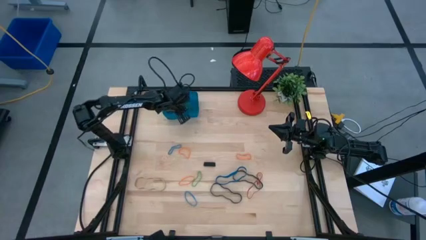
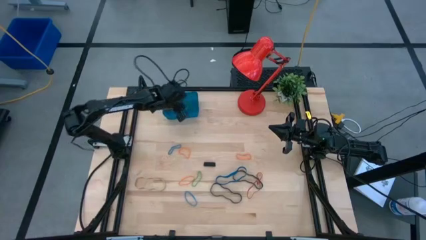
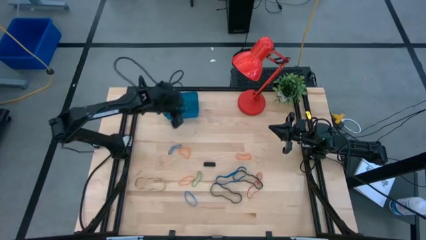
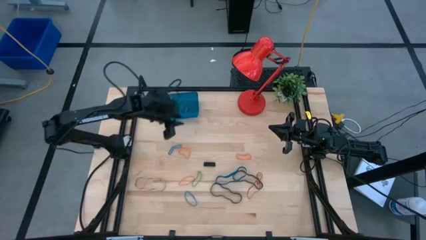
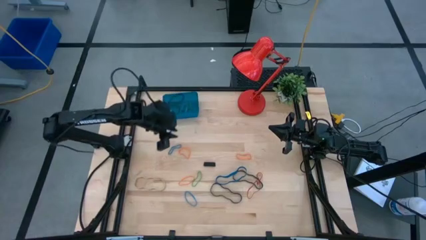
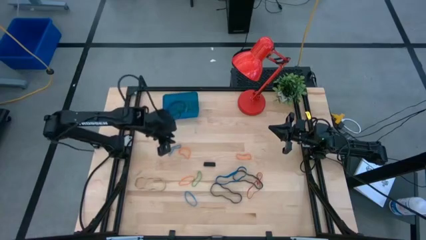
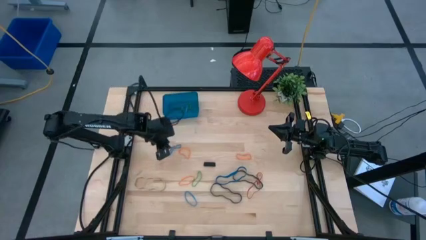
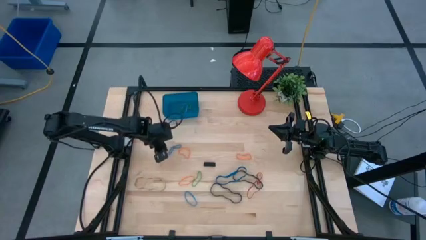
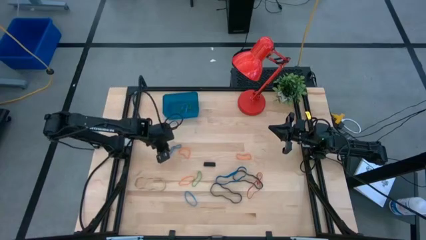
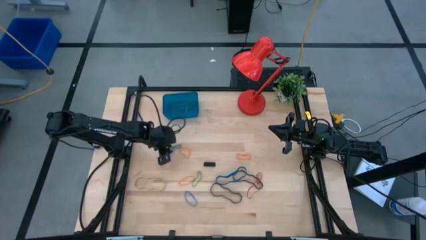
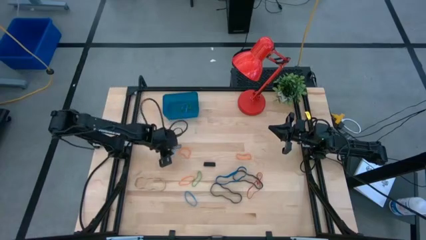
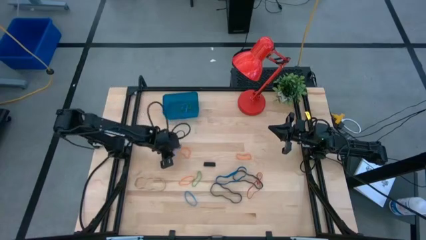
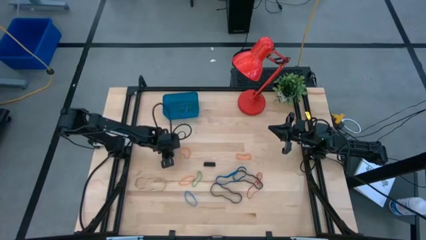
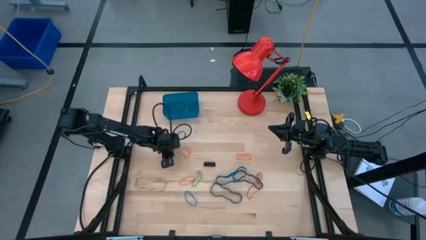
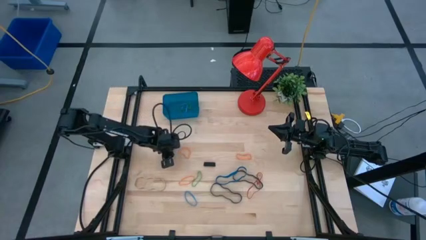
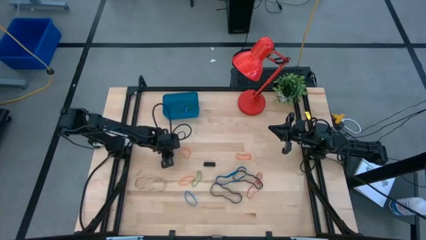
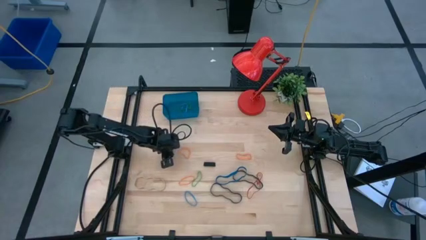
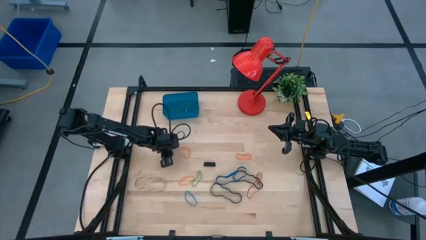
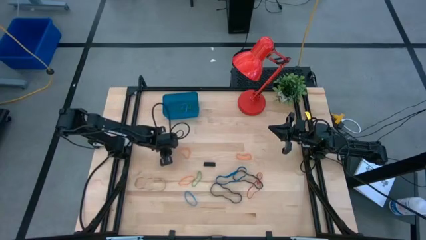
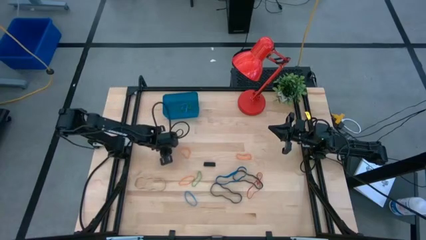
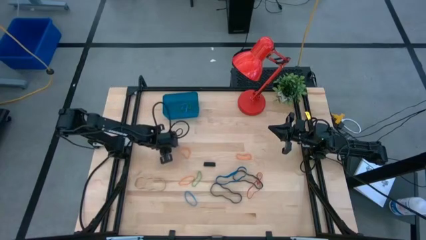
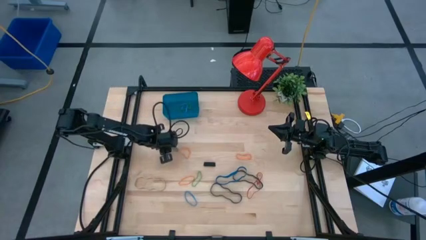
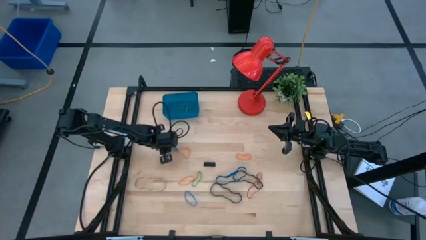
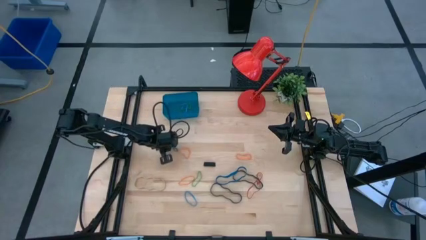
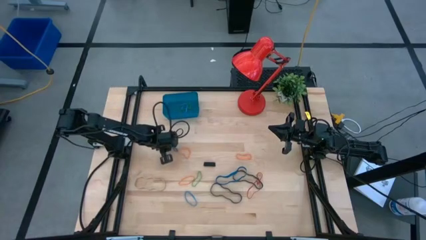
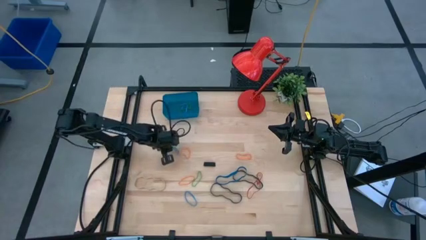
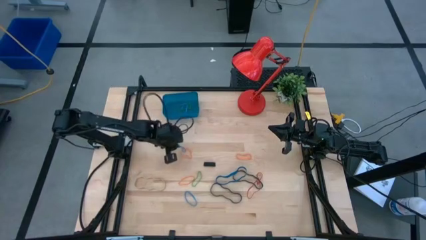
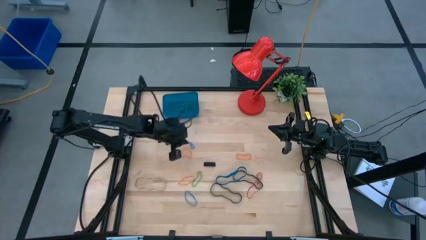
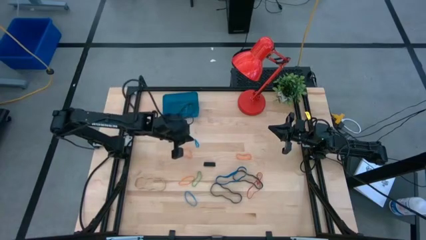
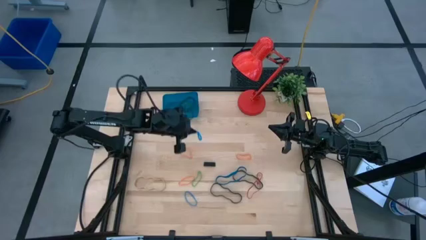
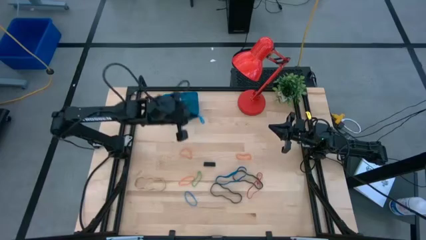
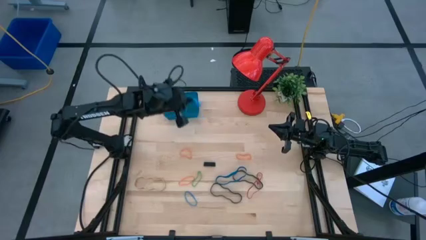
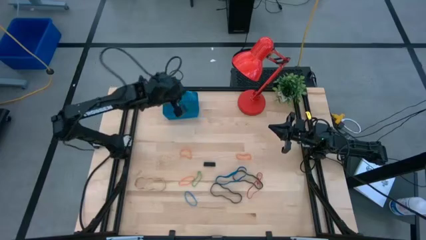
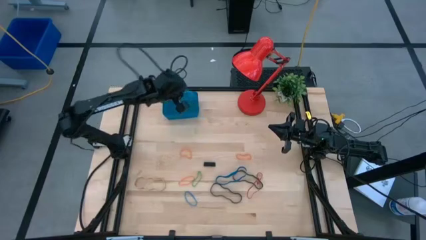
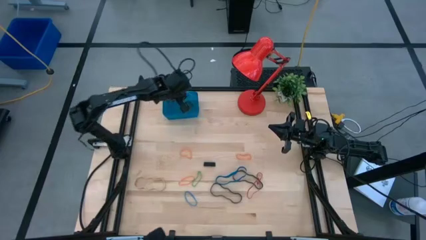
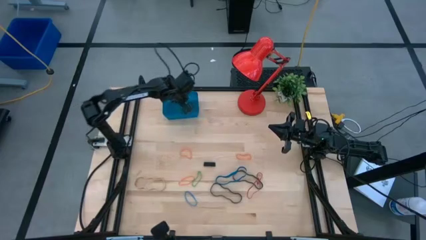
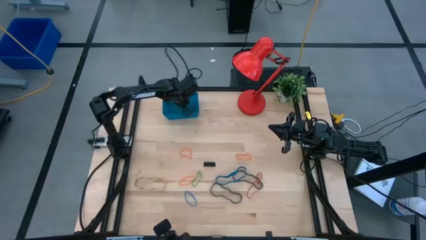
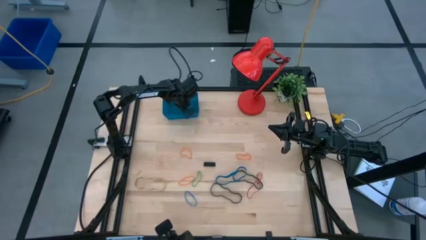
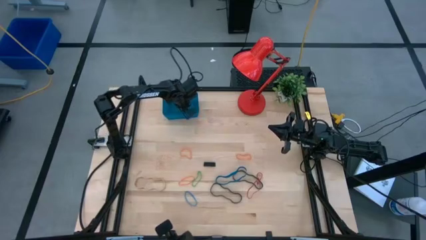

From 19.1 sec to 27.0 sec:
Task: Pick and place rubber bands into bin
Put the blue rubber band into the blue container

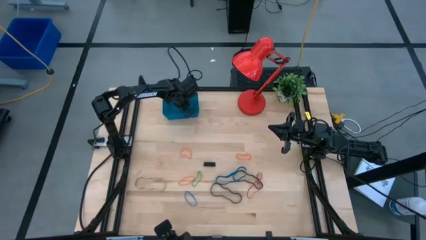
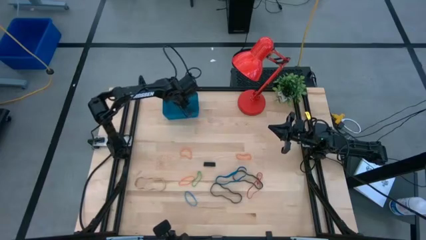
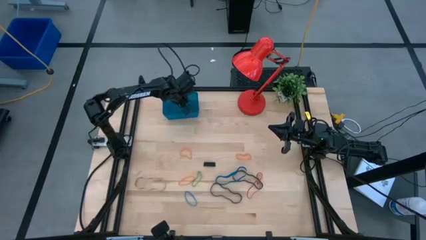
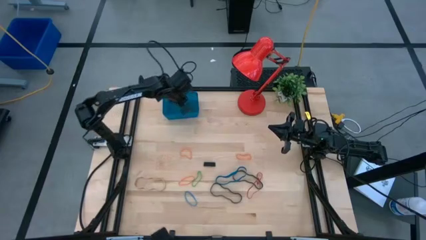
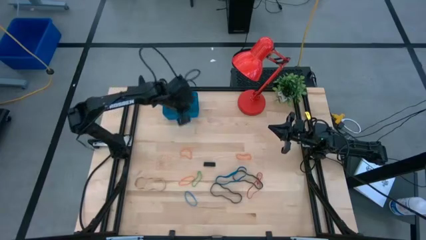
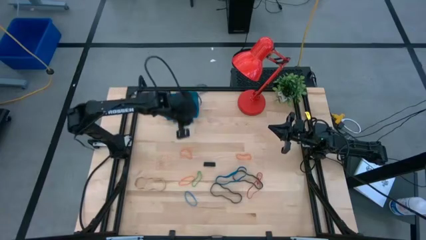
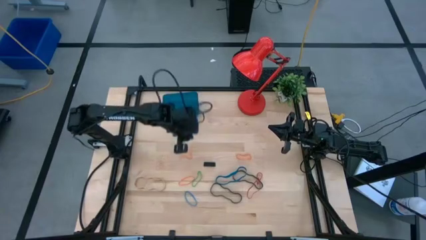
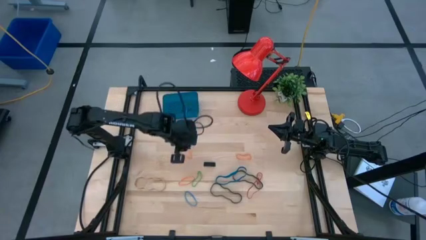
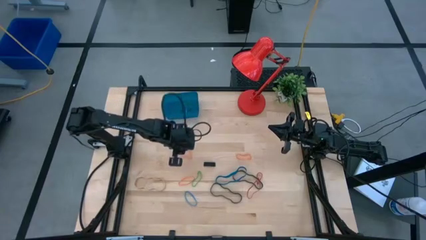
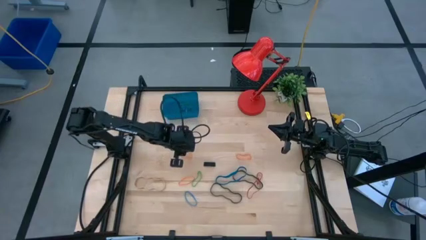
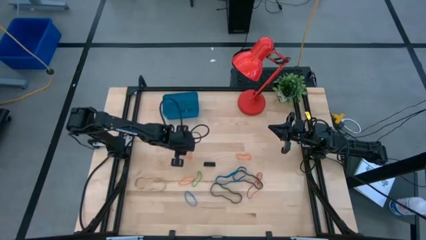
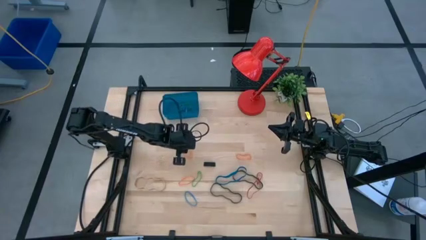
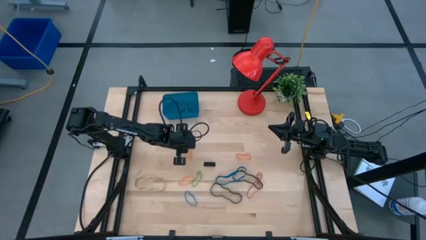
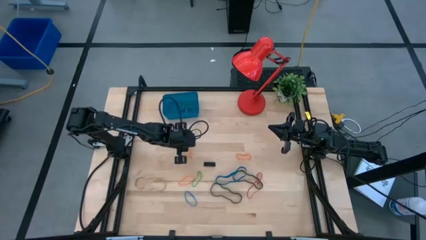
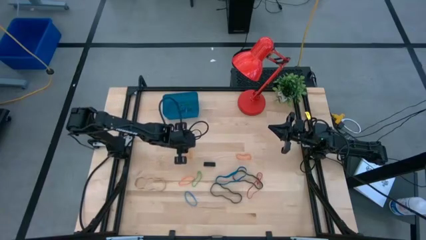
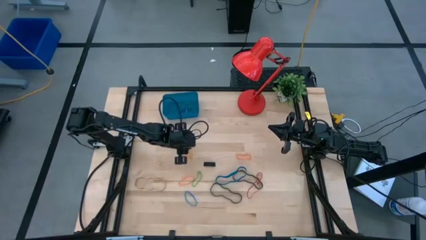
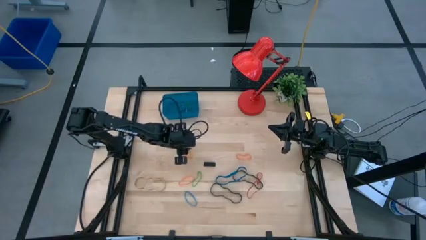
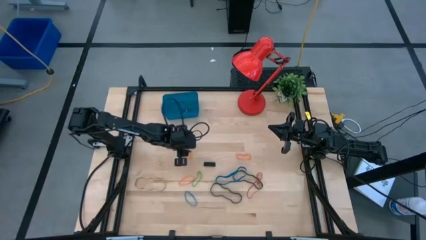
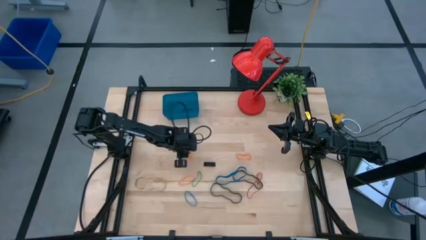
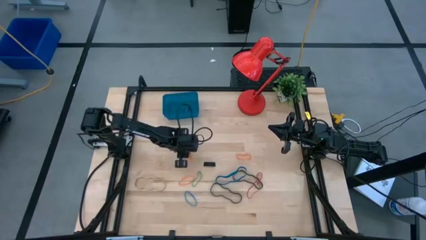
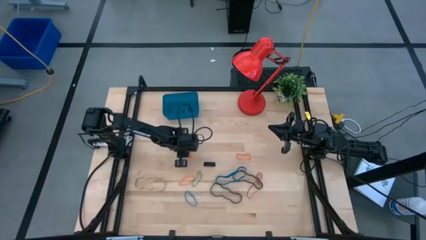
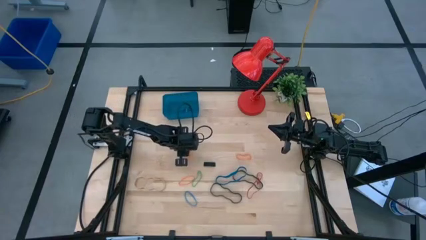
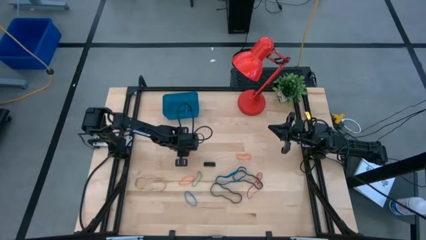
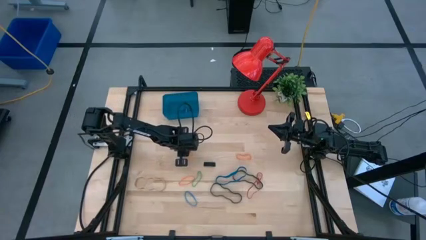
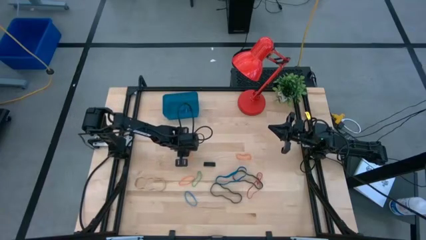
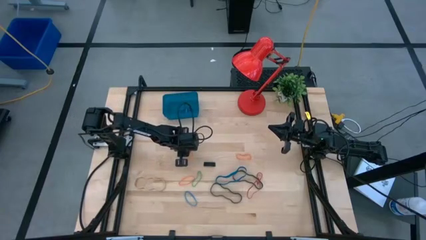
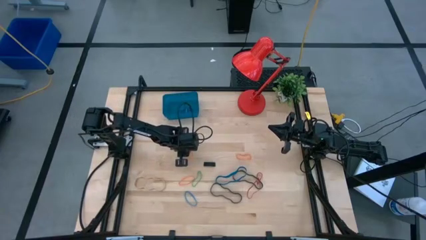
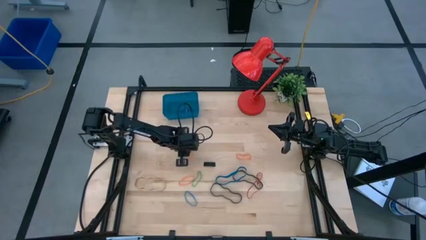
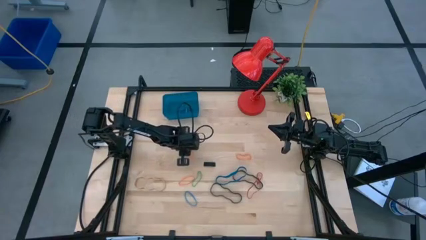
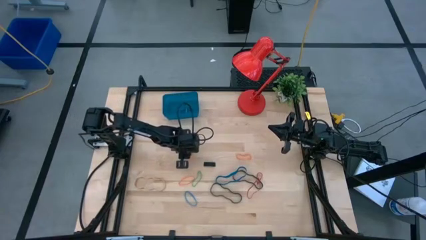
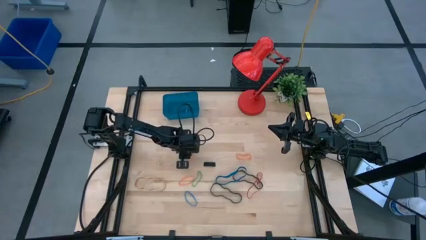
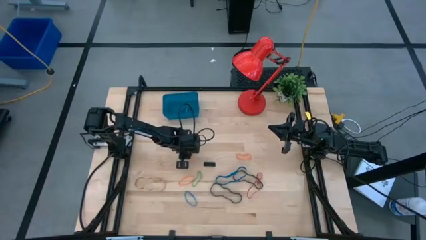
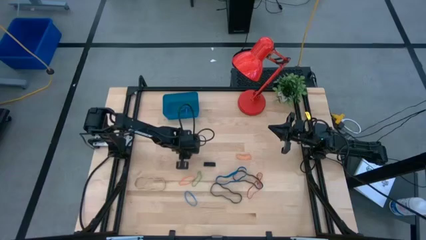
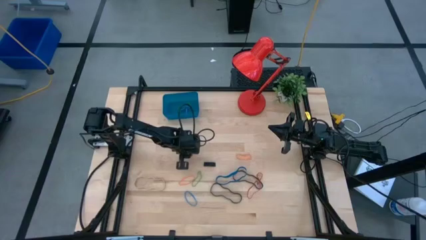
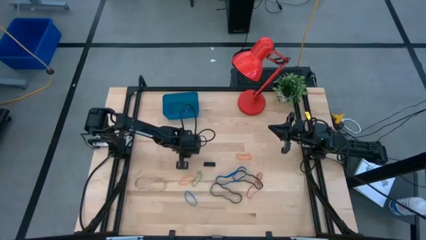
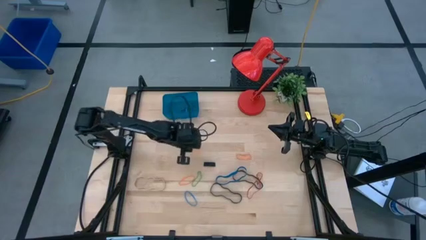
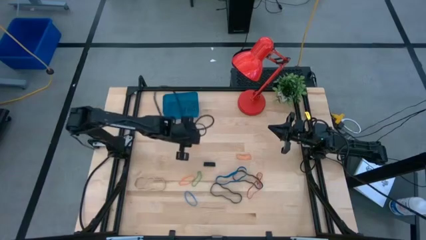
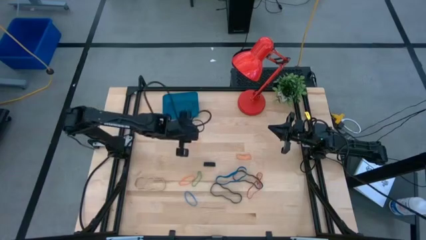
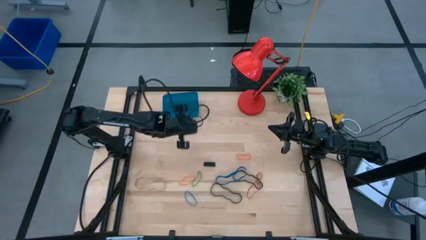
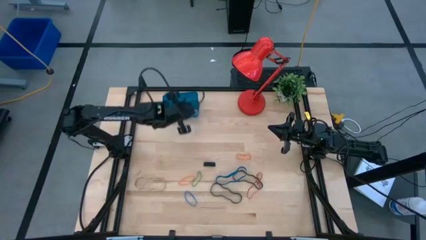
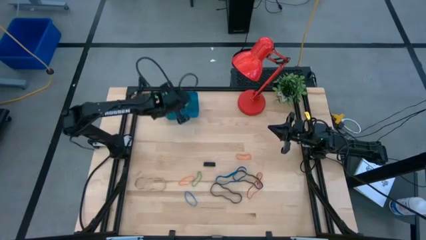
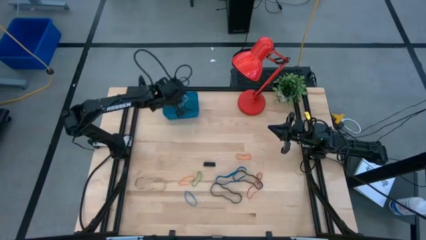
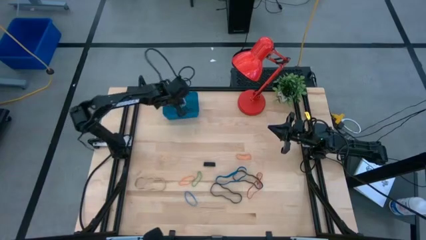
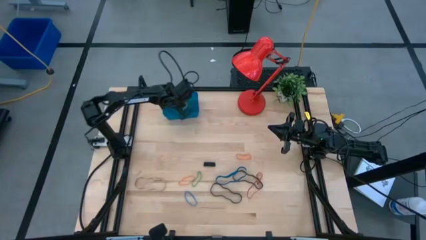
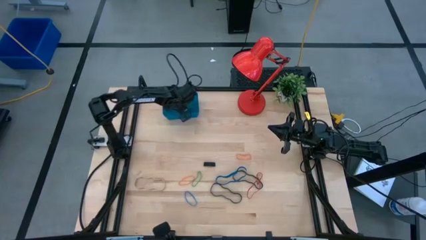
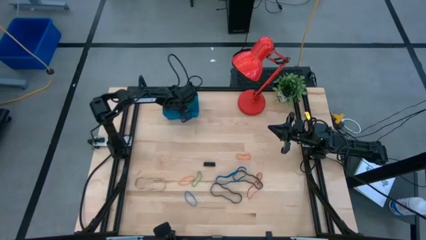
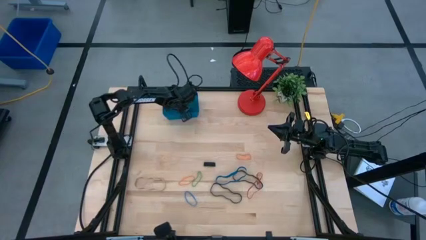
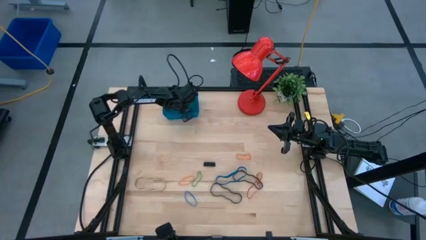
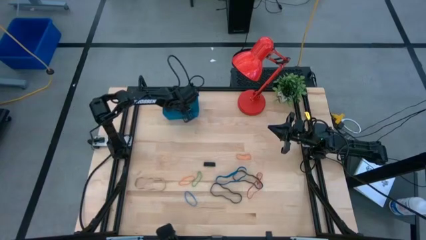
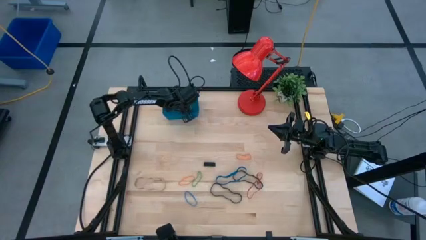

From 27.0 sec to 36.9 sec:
Put the top left orange rubber band into the blue container
